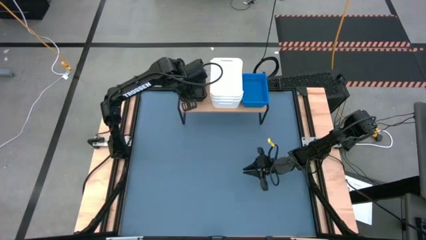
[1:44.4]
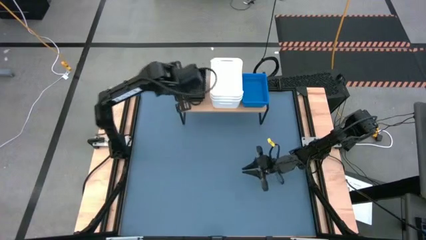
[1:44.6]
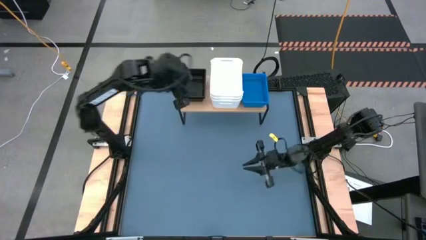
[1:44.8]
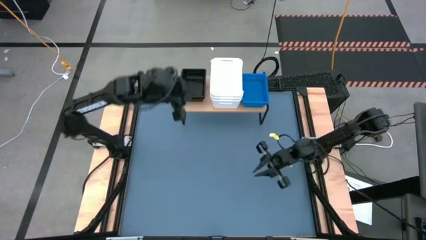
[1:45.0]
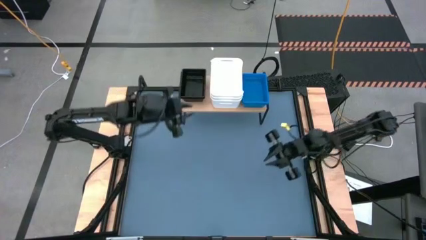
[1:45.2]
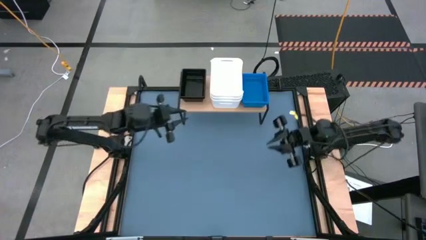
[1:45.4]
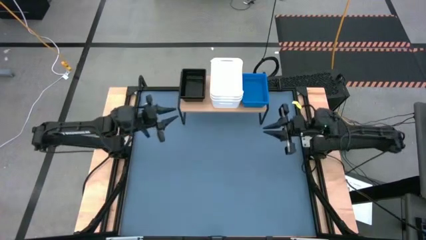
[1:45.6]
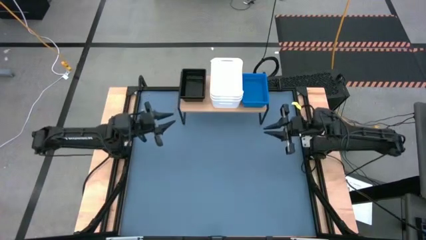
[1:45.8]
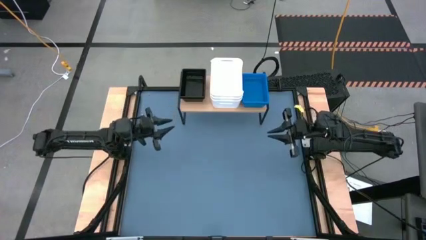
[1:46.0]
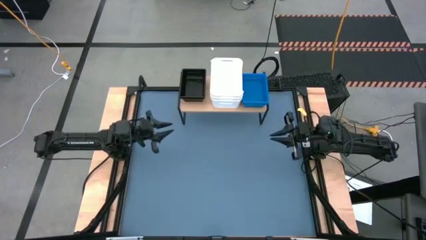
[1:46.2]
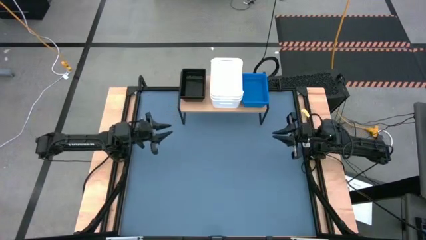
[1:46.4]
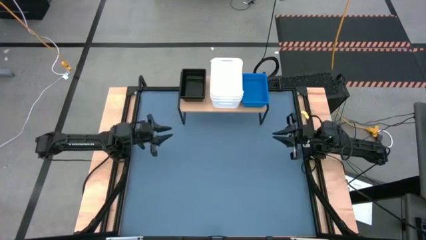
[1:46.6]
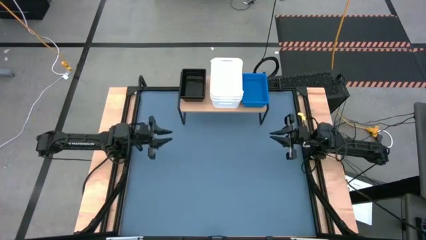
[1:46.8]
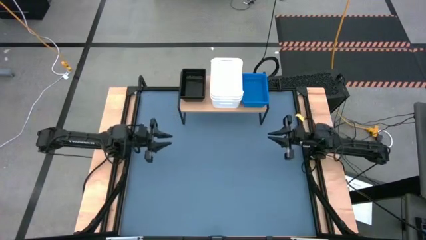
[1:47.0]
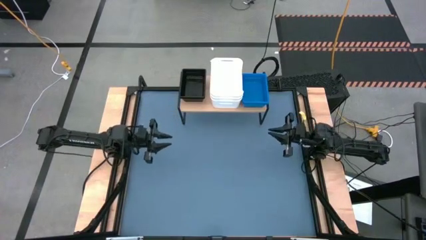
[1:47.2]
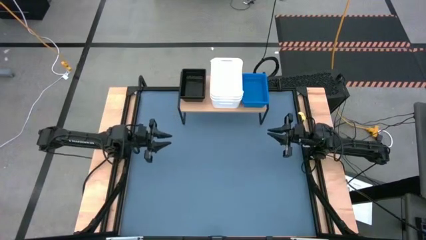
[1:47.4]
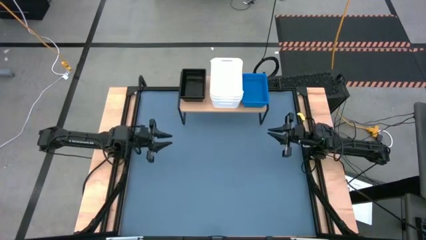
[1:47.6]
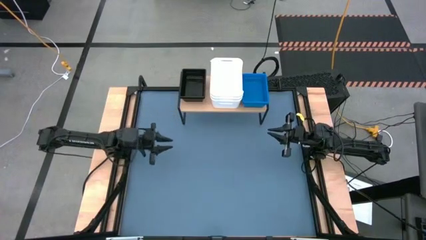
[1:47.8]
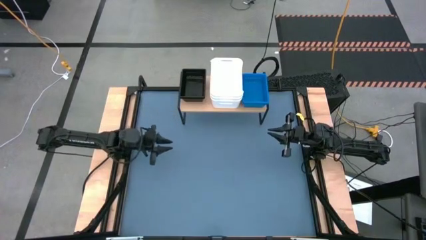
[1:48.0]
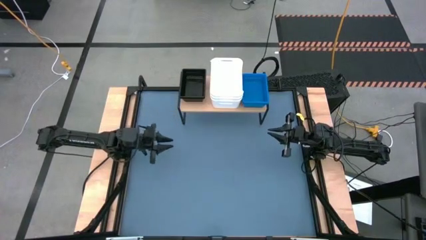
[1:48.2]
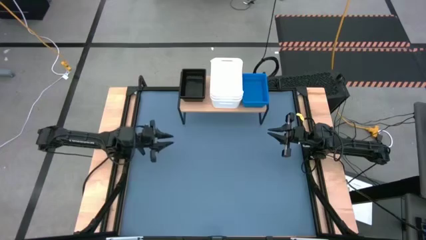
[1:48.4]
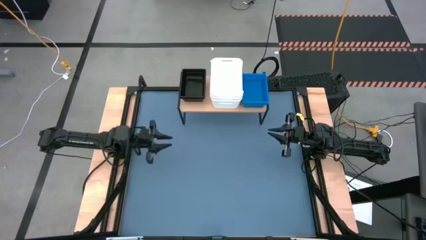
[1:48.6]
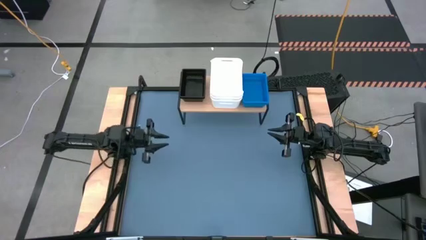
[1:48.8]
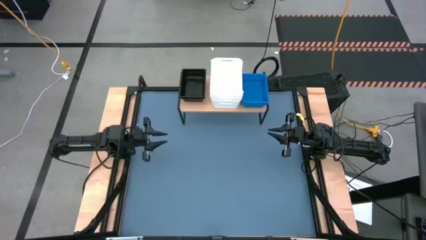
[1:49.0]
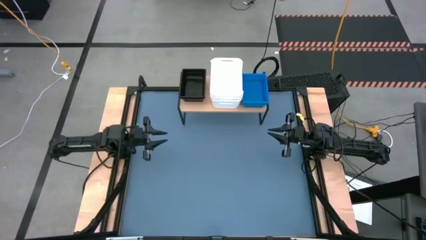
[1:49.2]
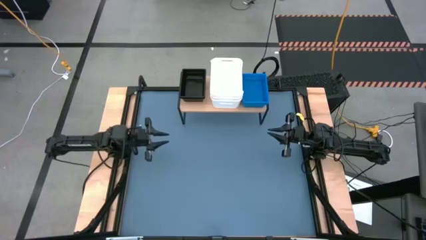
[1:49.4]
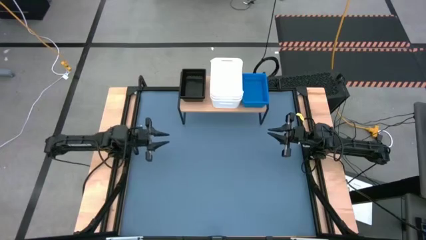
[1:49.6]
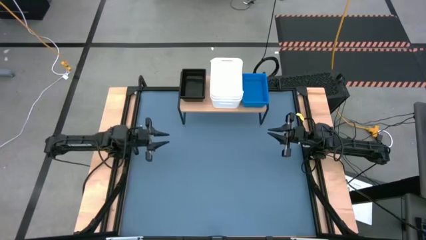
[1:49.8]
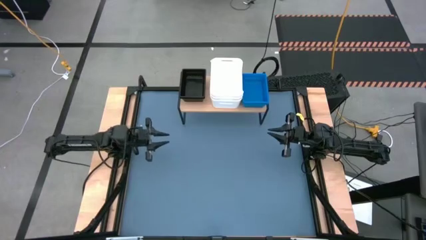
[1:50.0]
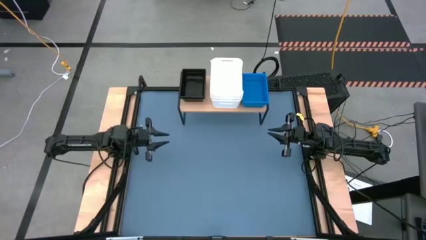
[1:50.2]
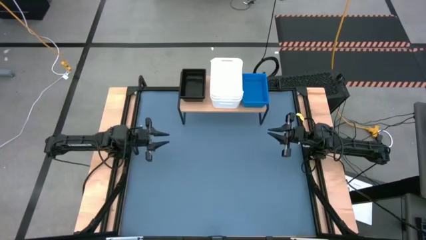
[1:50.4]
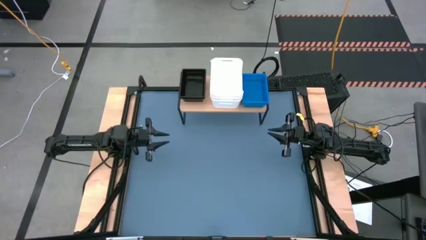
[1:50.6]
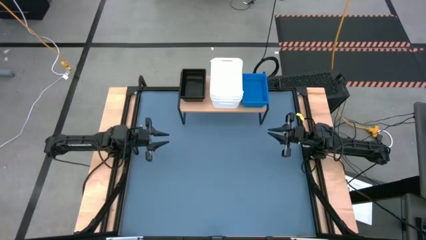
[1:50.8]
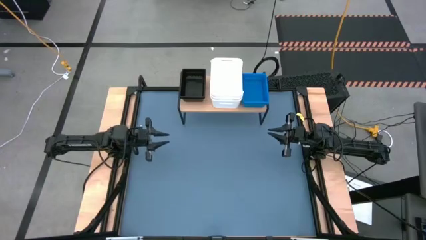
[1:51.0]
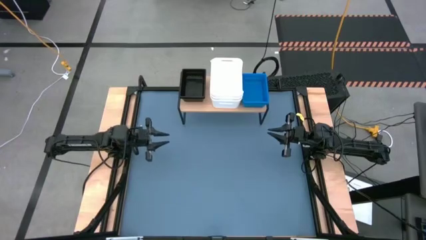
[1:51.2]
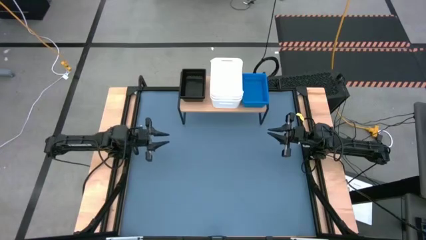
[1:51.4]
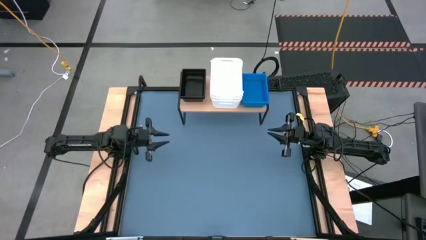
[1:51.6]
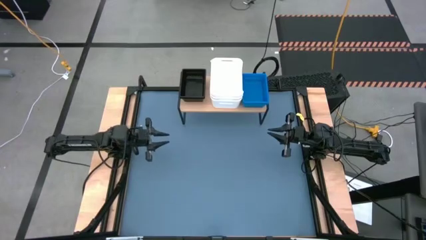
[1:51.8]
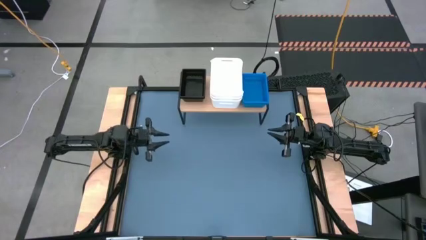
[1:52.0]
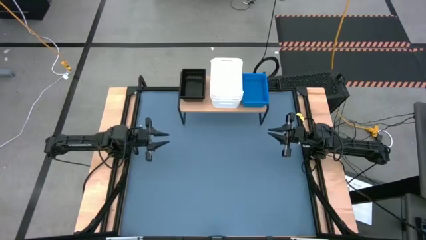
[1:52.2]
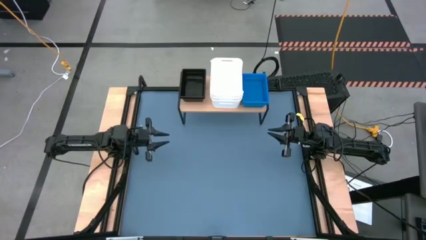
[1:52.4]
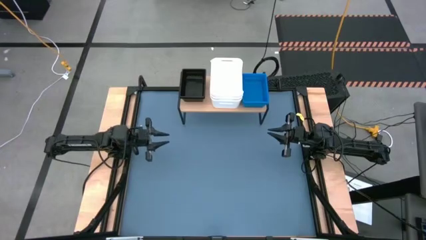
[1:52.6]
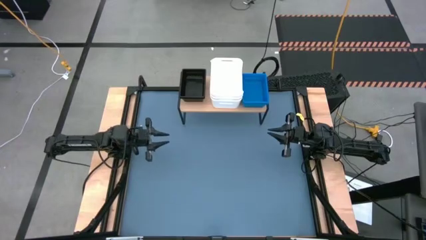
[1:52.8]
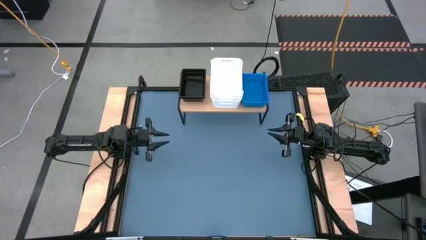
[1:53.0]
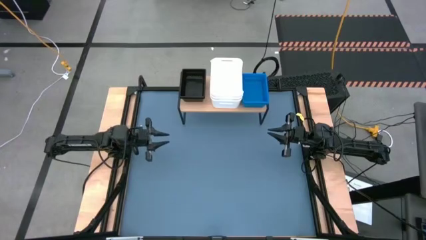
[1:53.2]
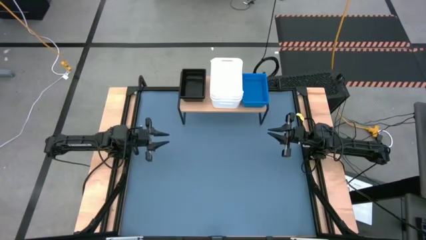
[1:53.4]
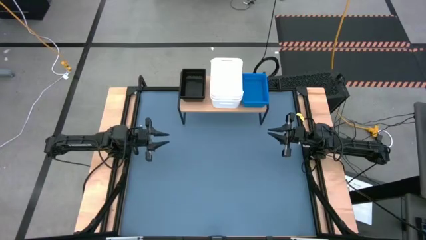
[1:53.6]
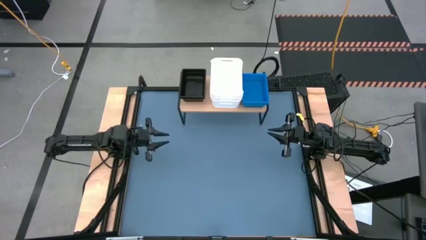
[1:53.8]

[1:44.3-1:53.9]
Task: Stack baskets on shelf by color
Return to Home Position

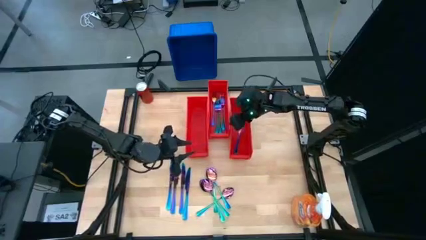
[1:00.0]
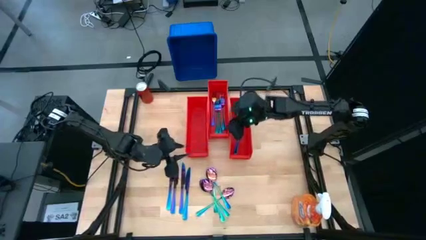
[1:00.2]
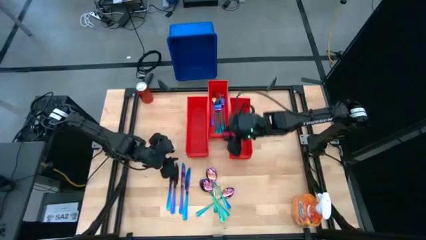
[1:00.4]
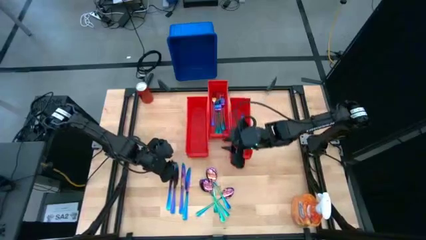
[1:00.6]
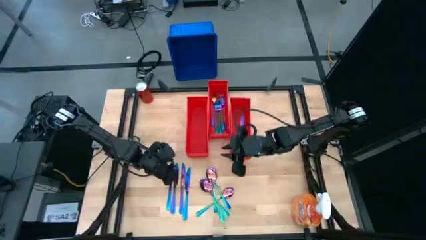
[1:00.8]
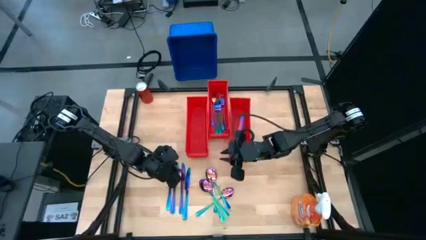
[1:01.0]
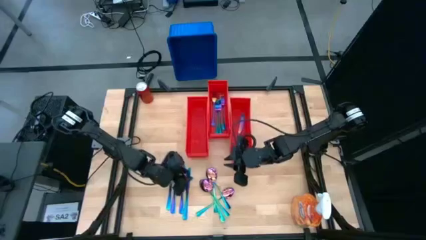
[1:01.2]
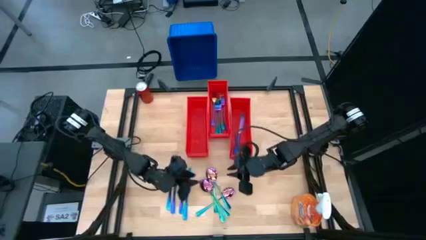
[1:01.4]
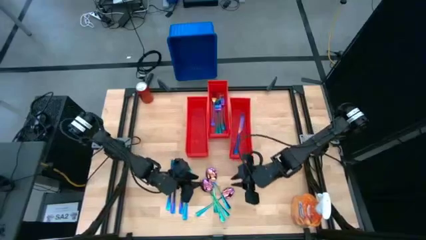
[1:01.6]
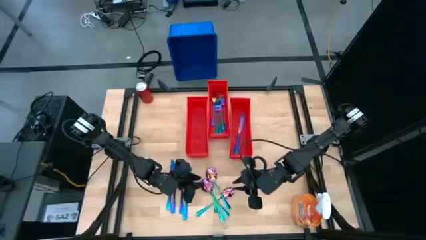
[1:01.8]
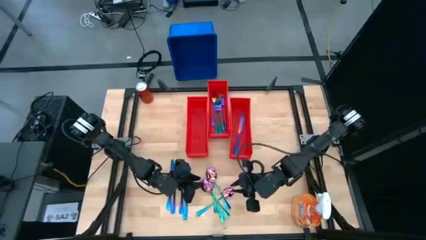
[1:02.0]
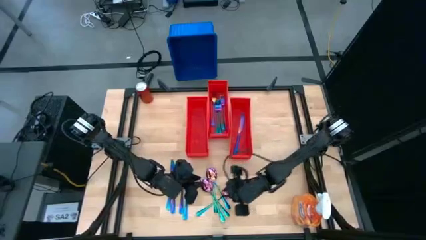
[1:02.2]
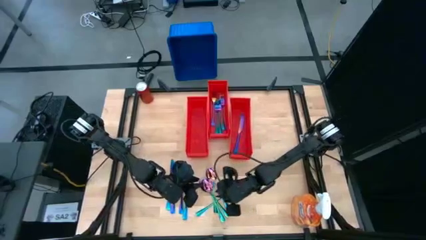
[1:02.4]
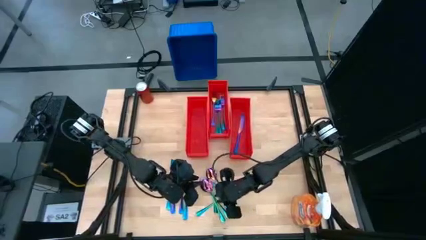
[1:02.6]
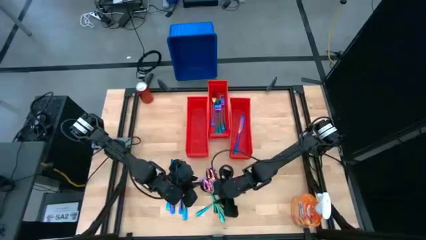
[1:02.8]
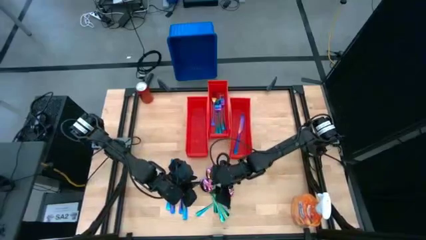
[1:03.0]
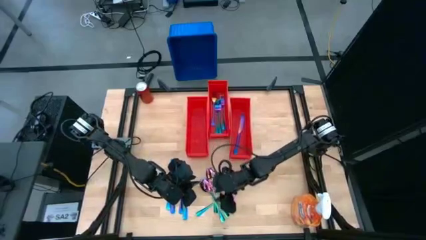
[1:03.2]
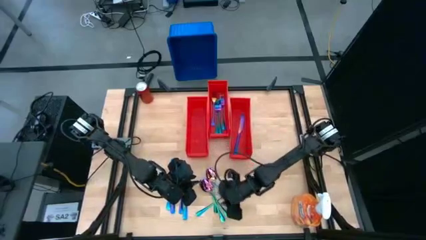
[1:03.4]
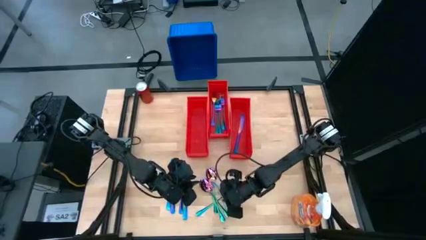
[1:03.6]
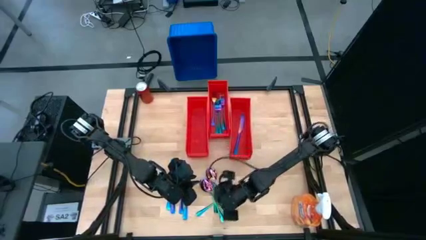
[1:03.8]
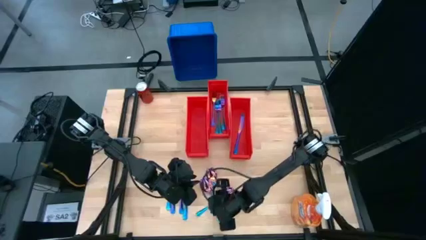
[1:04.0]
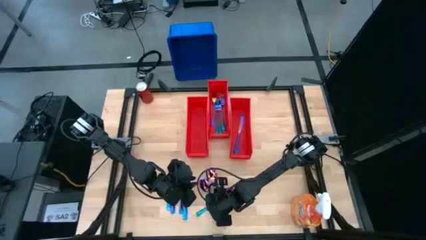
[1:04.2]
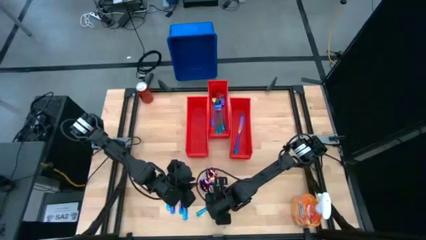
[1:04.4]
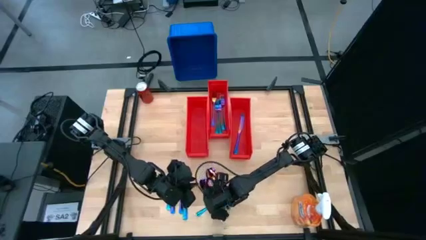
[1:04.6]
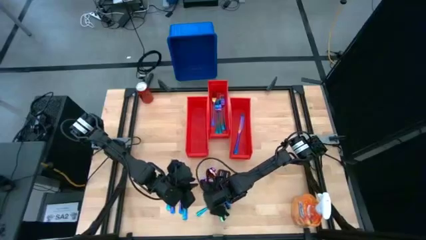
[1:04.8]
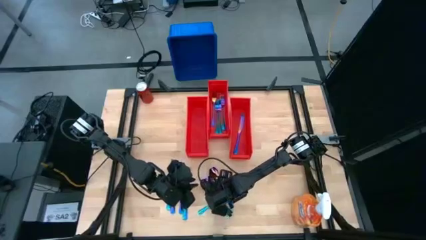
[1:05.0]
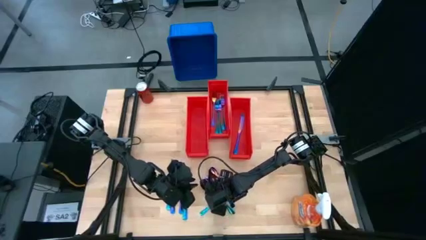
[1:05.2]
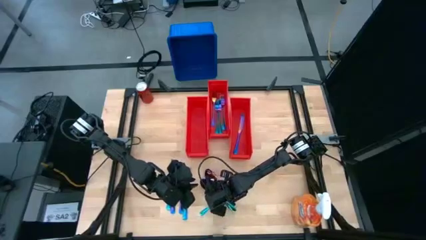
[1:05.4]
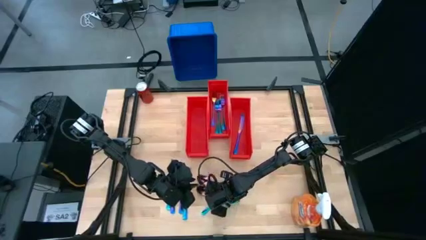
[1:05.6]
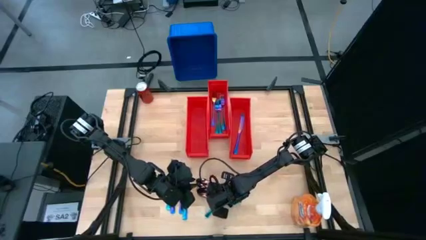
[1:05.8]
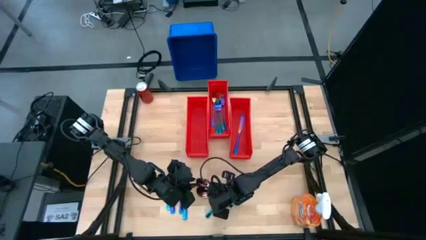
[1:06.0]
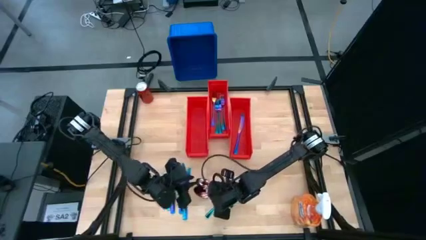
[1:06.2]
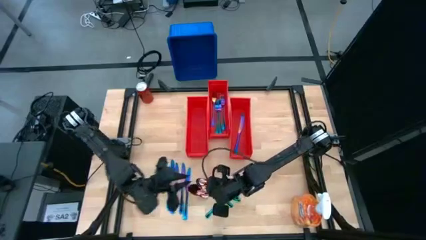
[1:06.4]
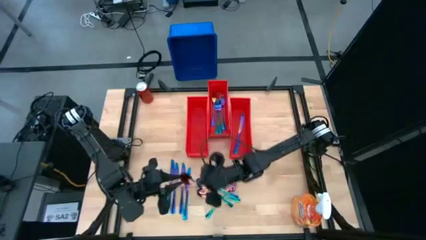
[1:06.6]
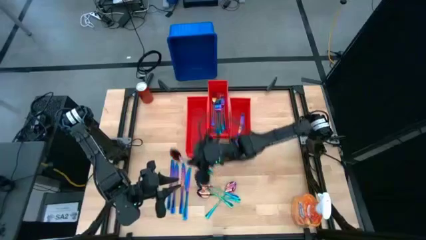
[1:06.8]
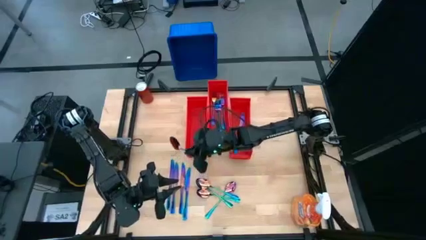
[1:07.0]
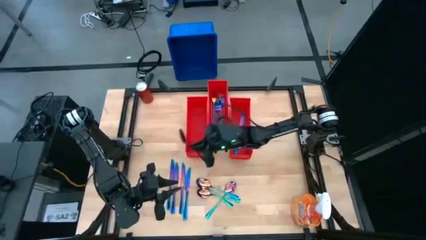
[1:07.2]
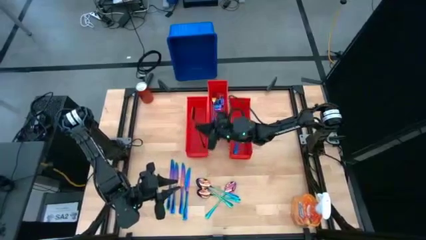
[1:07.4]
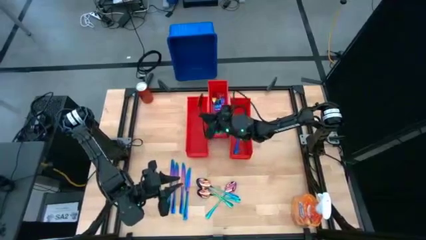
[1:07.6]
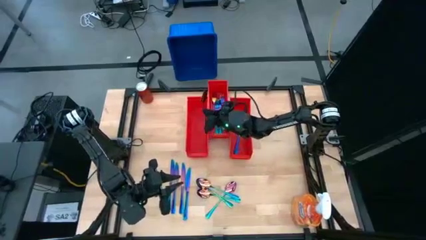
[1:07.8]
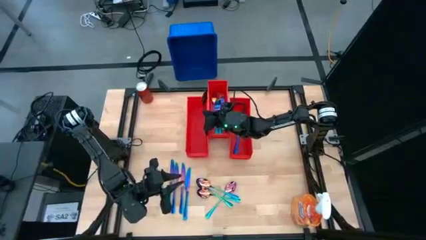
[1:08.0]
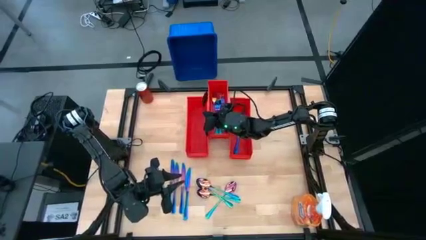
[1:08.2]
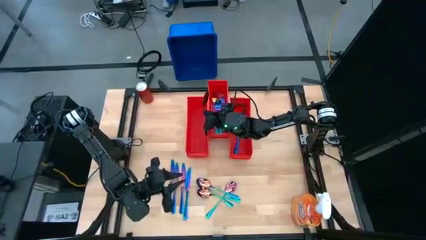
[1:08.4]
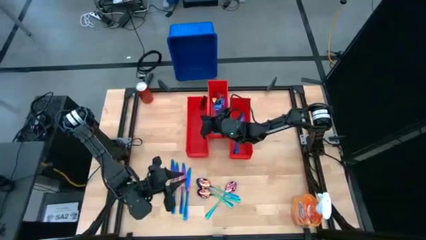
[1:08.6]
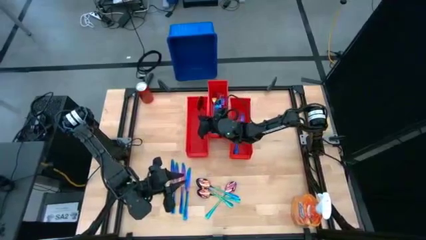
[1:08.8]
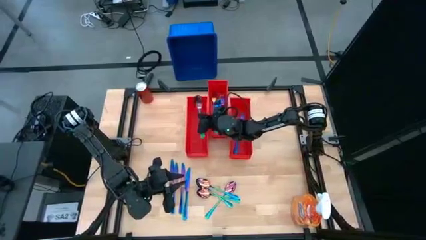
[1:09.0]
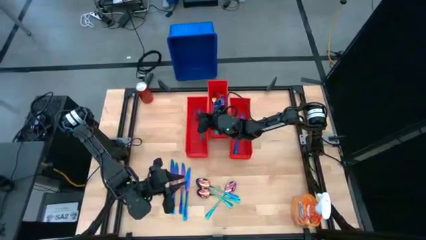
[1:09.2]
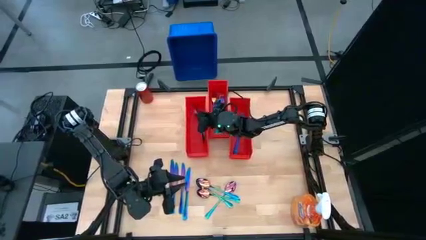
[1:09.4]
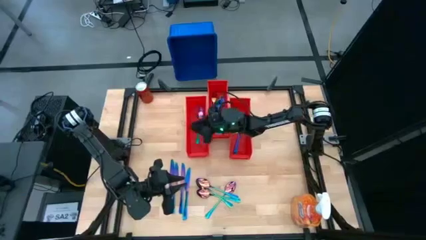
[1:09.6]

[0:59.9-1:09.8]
Task: Sort silverware
Put the iridescent spoon into the left orange bin
